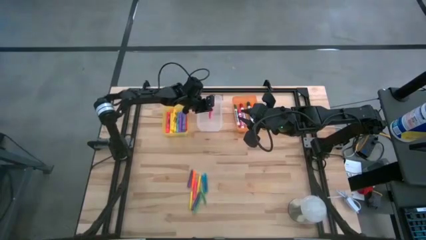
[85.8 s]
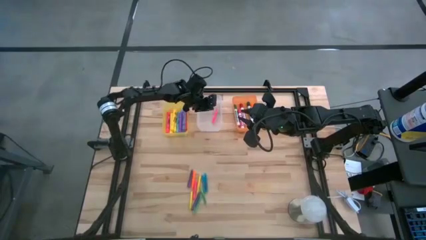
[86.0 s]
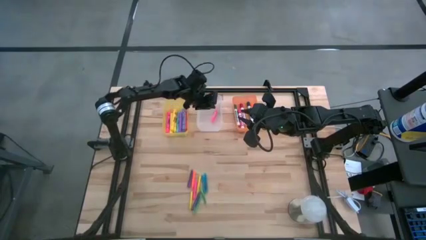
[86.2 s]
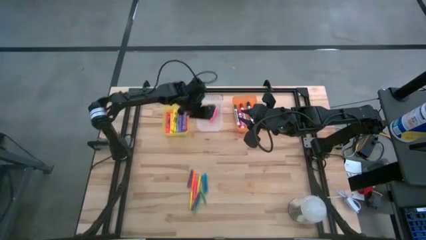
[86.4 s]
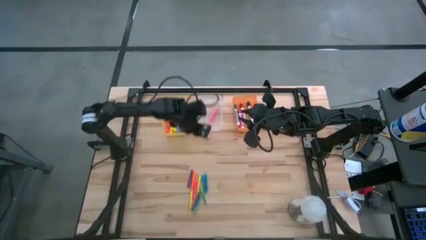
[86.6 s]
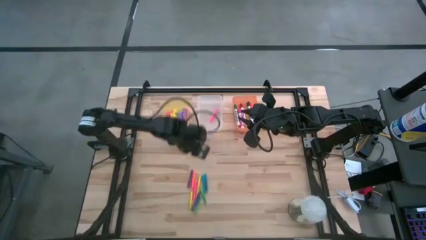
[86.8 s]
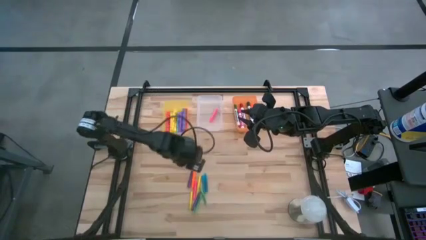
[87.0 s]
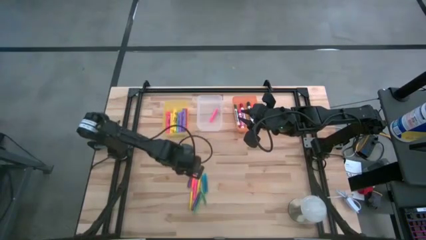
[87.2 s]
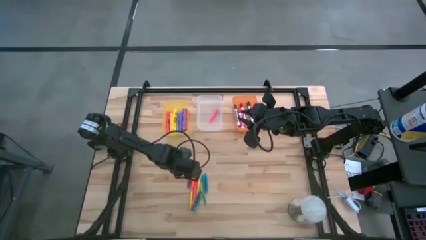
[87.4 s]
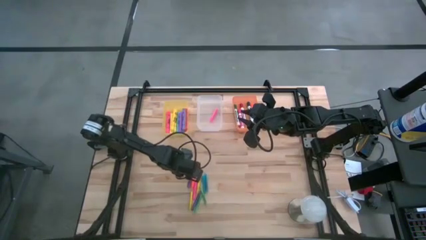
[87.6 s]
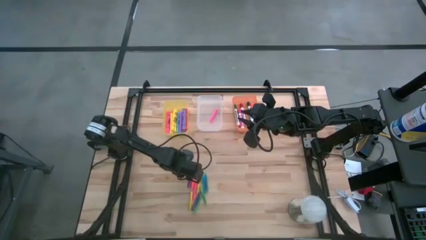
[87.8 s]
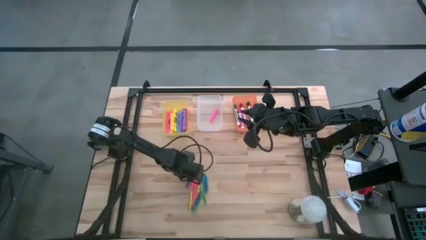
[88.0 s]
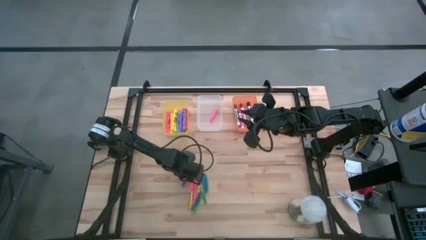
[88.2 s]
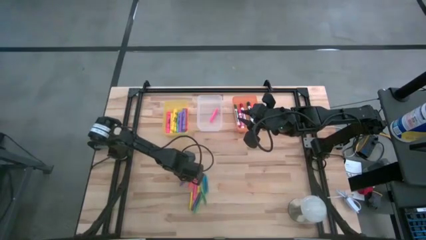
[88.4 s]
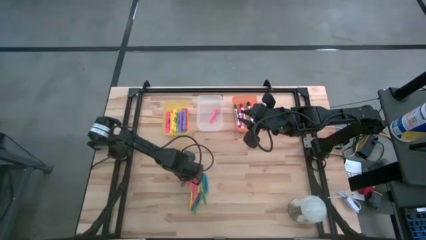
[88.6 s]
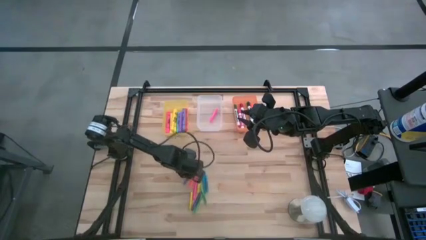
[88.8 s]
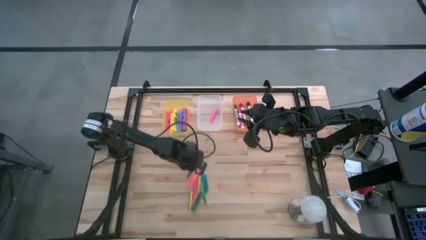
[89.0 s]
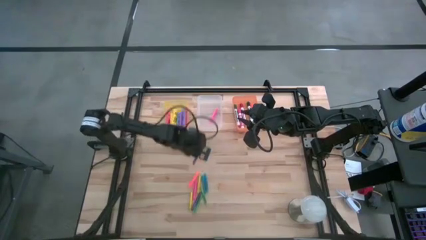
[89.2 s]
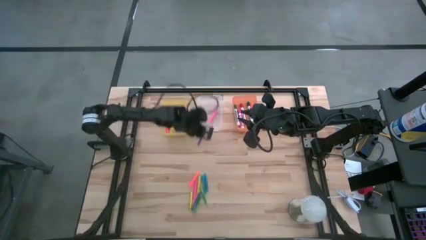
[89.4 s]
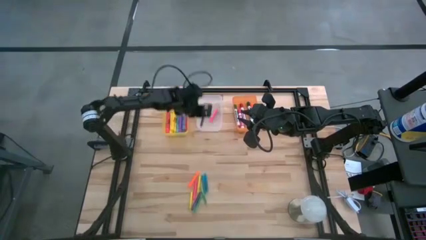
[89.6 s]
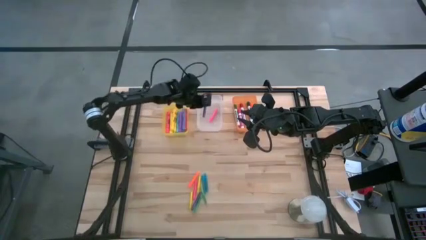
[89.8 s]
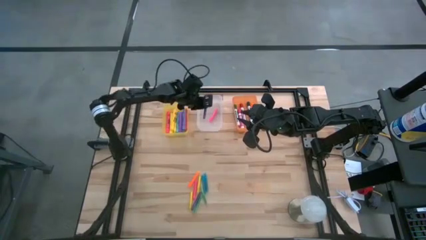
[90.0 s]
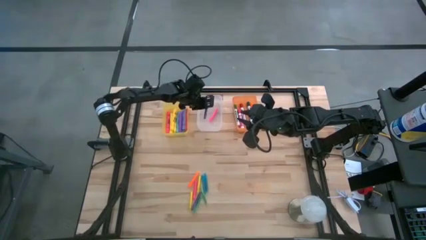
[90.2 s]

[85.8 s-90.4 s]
Task: Pick & Place Markers
Put the top purple pen into the white bin

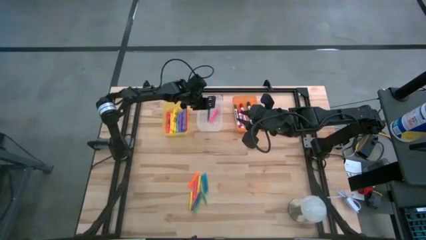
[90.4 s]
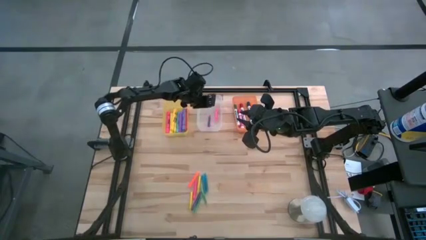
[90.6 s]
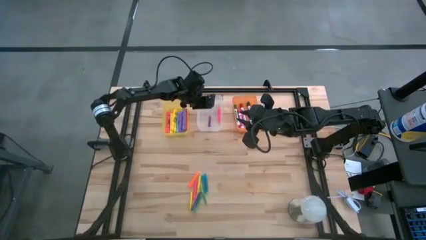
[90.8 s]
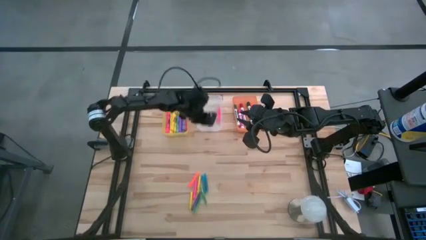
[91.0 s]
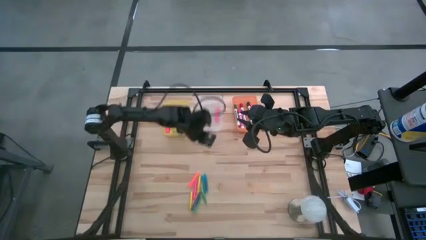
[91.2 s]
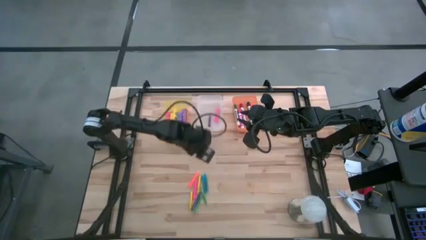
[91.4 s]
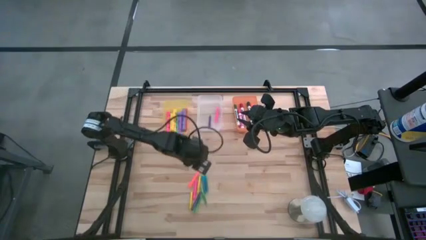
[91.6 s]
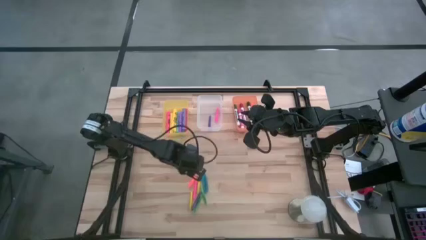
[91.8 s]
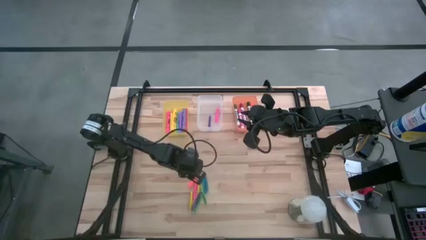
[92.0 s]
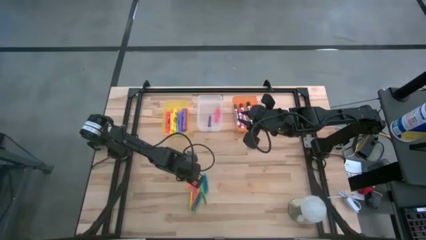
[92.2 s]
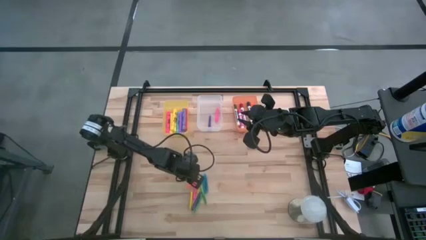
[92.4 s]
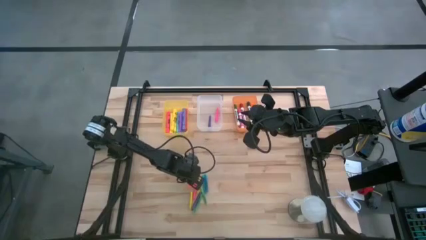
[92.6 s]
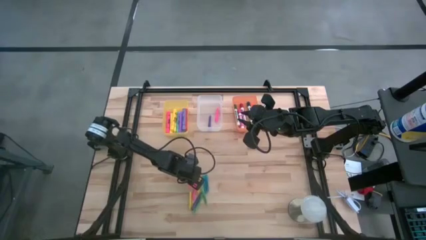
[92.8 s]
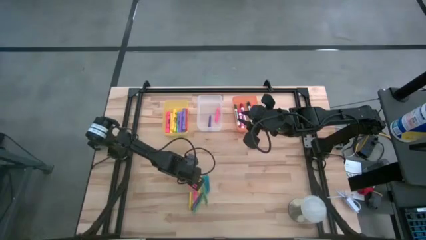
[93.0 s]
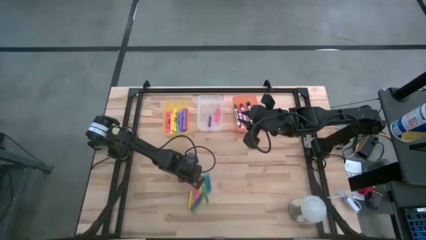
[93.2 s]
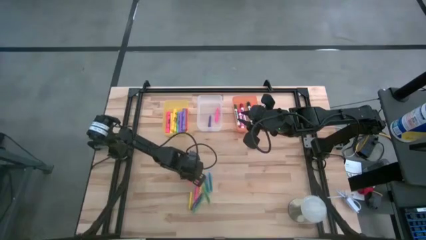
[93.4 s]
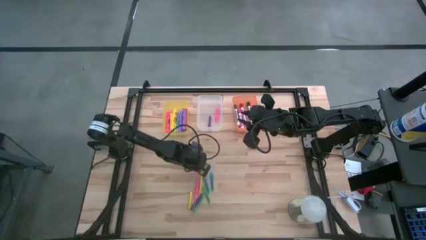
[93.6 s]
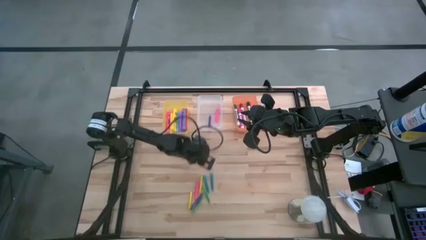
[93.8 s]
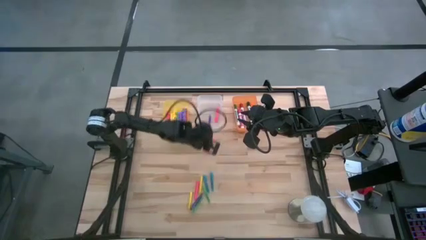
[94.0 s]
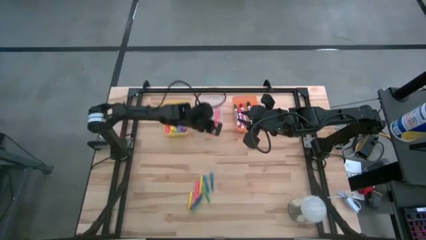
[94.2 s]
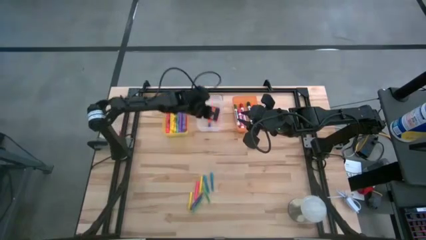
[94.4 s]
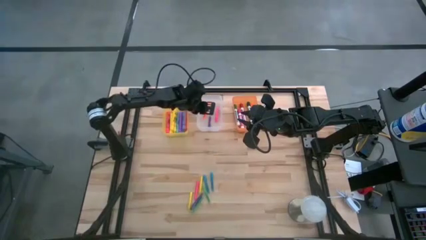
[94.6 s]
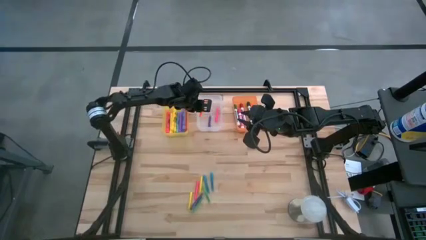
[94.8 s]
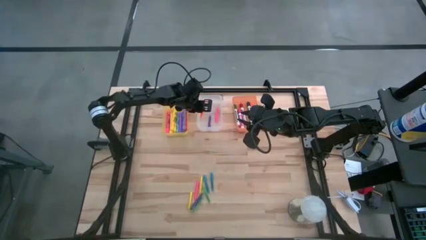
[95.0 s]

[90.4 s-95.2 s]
Put the orange pen into the white bin

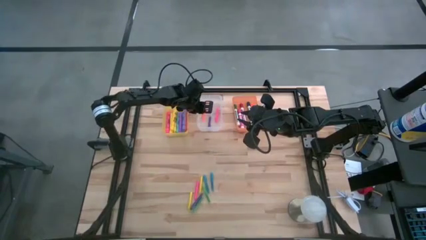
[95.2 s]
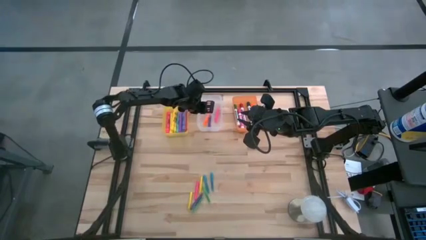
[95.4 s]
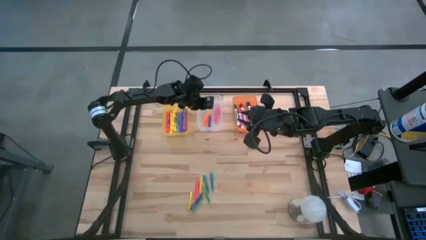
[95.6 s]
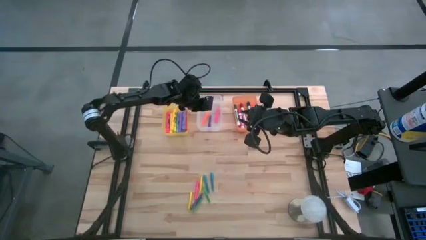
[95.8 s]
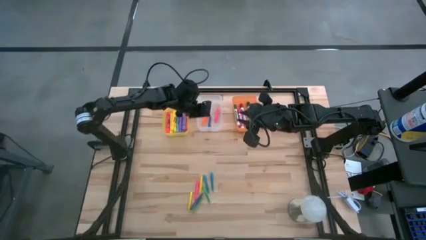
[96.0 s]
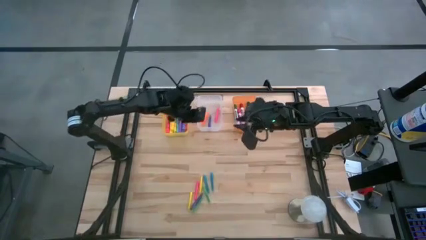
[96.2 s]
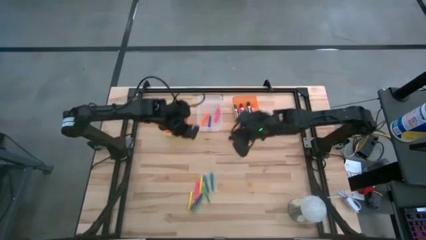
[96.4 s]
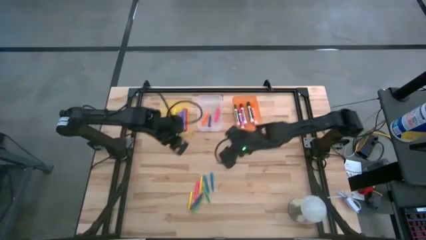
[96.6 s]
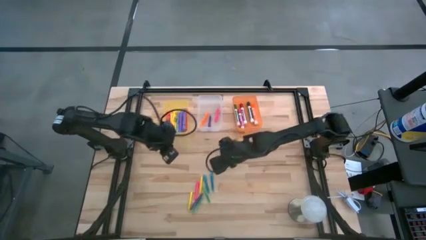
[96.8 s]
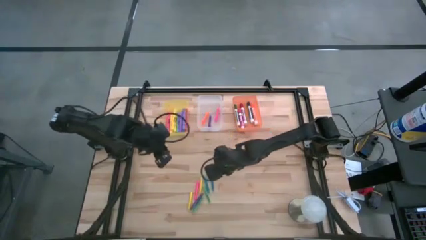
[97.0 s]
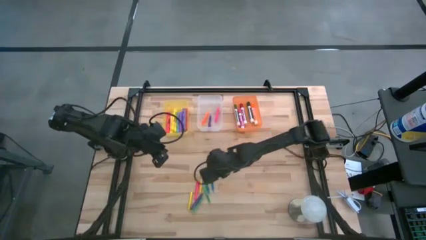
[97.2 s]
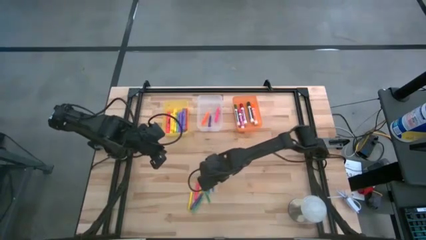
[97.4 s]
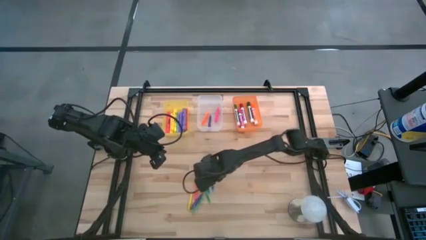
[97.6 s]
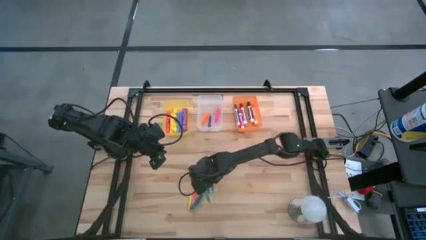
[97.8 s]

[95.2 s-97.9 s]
Put the right blue pen into the white bin

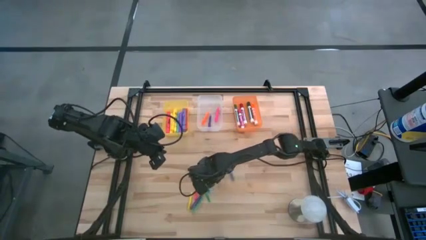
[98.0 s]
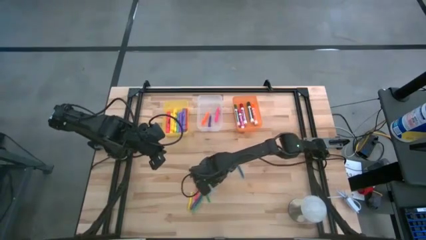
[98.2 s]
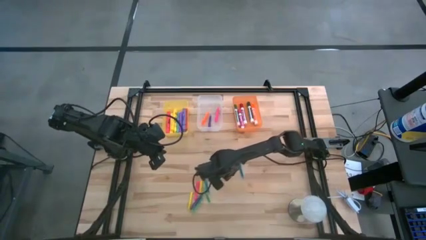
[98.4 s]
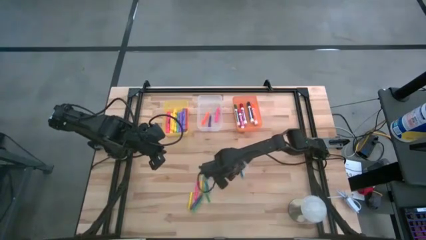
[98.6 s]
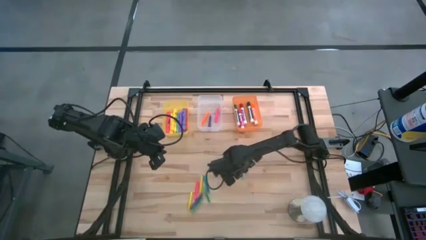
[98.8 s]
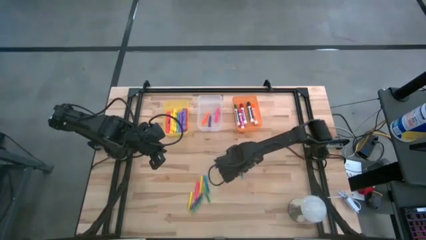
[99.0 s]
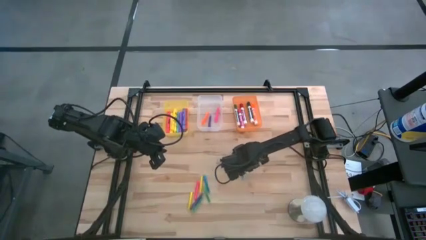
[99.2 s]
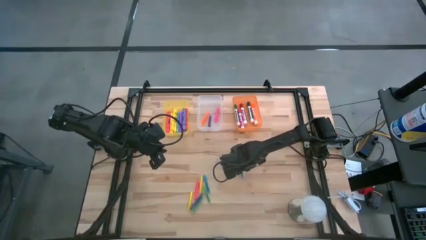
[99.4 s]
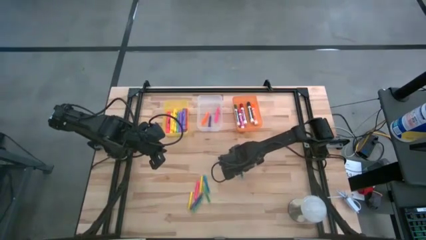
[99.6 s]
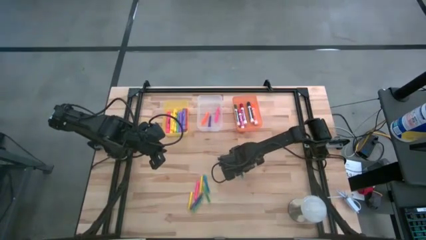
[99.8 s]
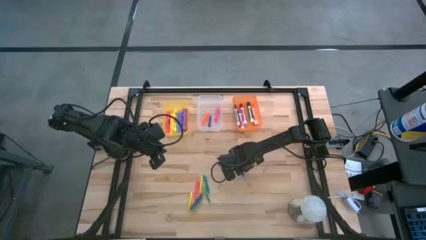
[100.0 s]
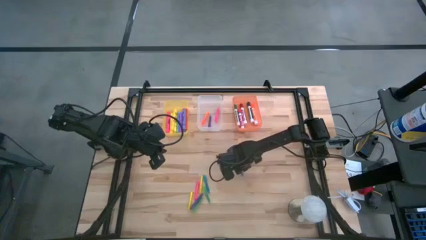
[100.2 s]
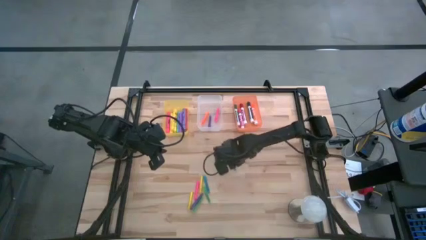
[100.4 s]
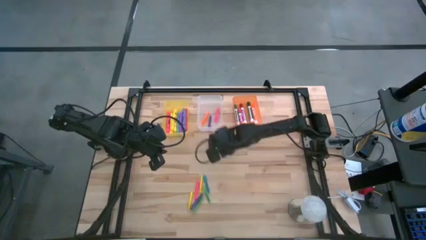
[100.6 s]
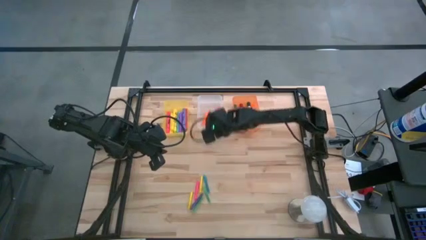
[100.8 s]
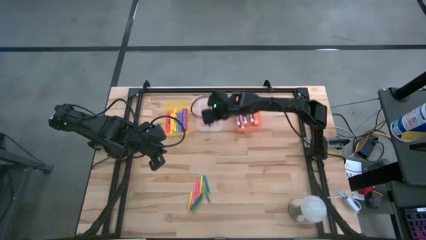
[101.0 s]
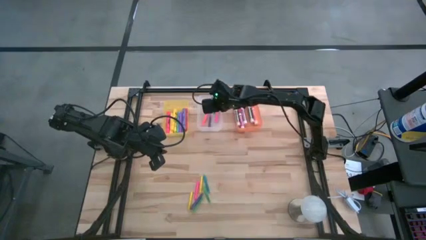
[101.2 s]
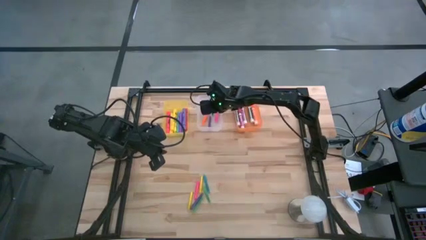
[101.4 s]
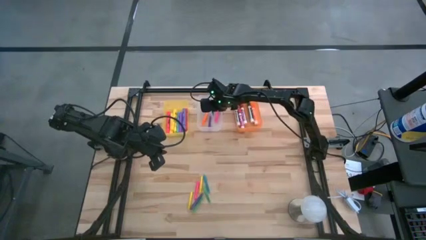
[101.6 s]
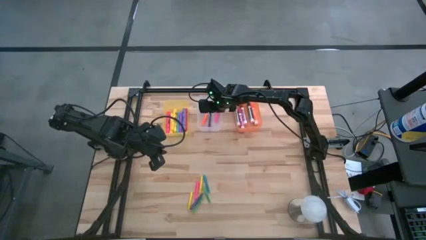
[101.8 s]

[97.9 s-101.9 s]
Put the right blue pen into the white bin
